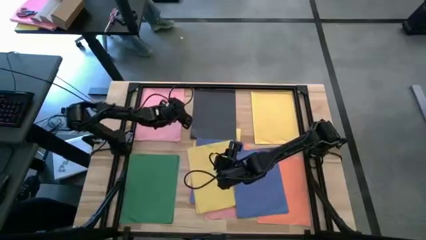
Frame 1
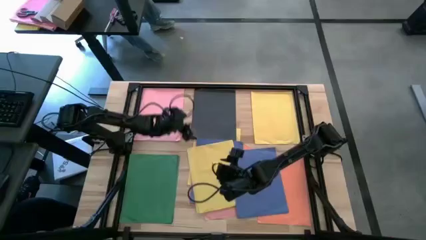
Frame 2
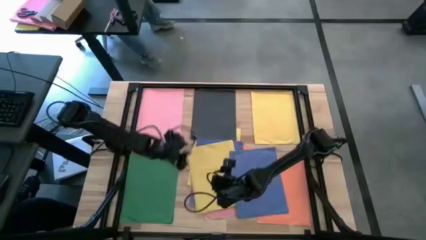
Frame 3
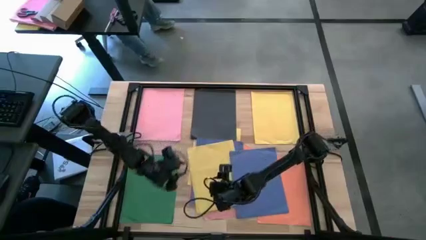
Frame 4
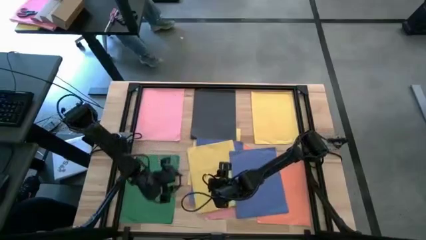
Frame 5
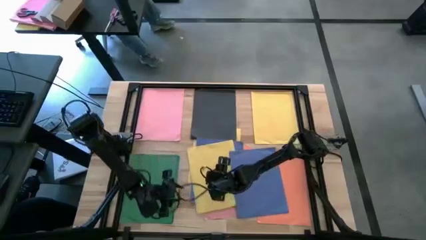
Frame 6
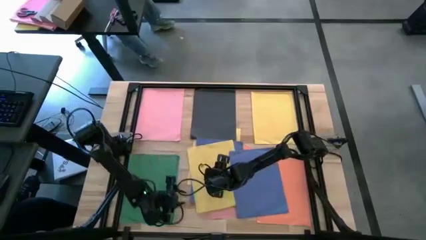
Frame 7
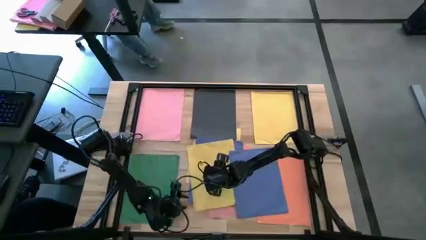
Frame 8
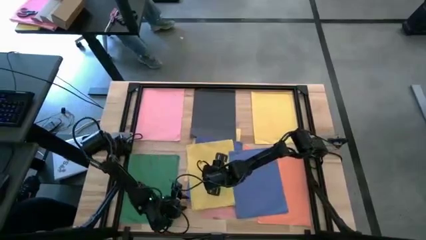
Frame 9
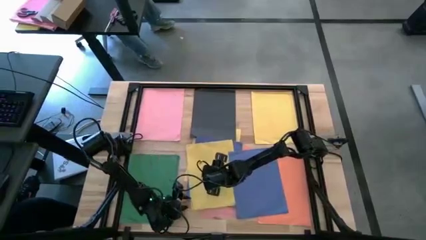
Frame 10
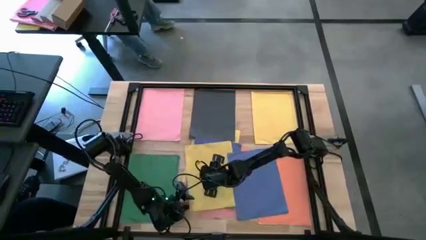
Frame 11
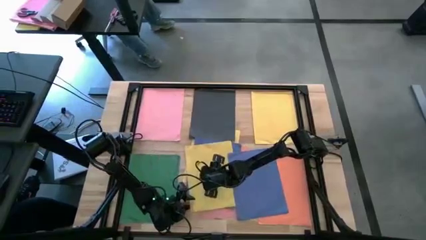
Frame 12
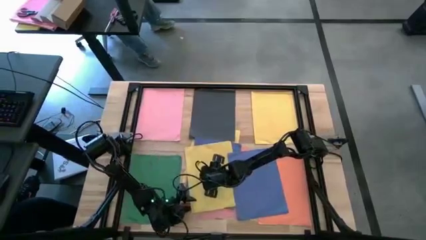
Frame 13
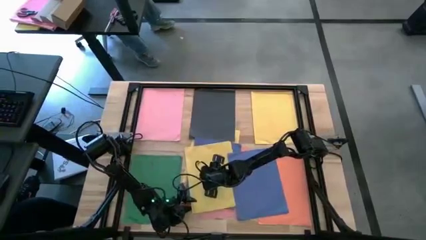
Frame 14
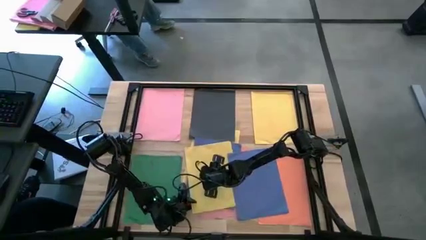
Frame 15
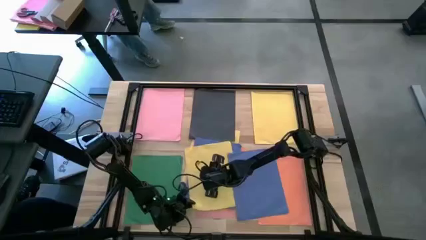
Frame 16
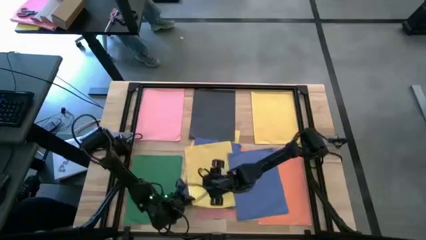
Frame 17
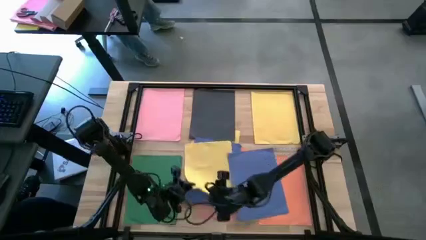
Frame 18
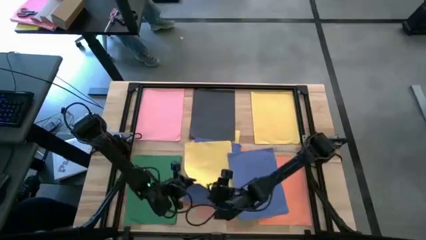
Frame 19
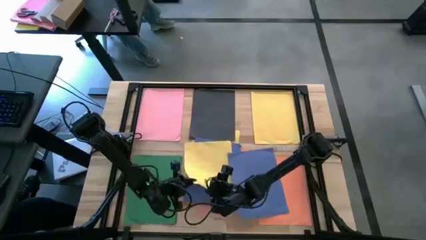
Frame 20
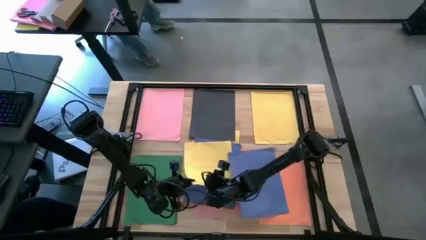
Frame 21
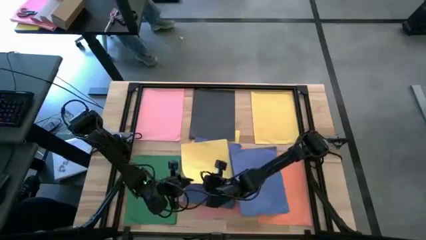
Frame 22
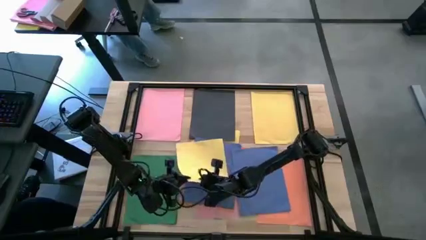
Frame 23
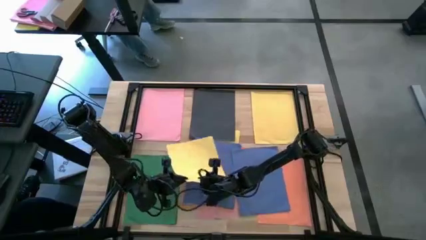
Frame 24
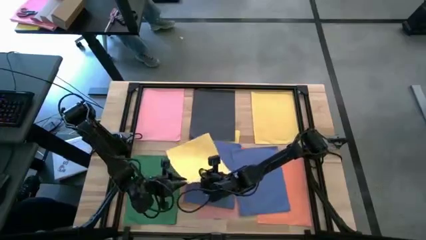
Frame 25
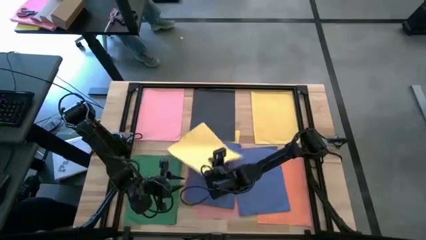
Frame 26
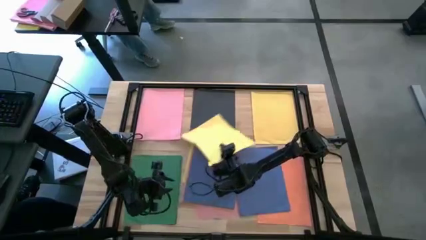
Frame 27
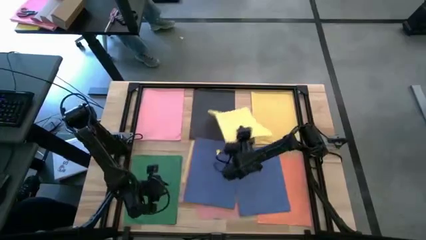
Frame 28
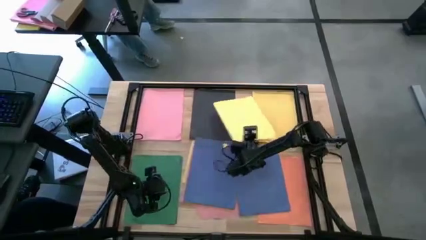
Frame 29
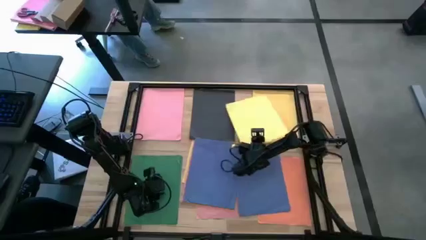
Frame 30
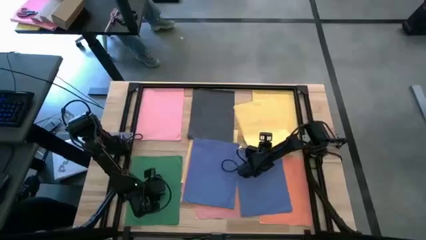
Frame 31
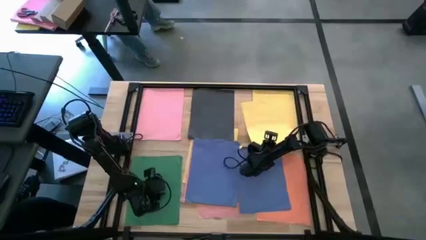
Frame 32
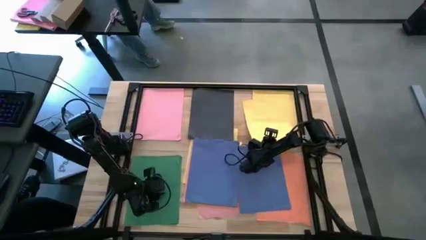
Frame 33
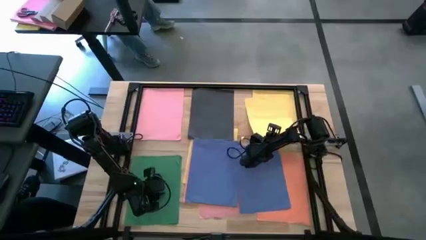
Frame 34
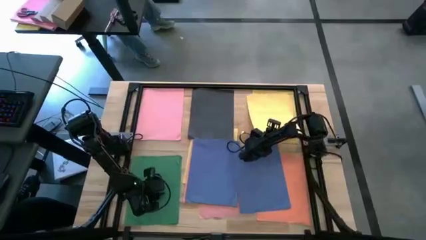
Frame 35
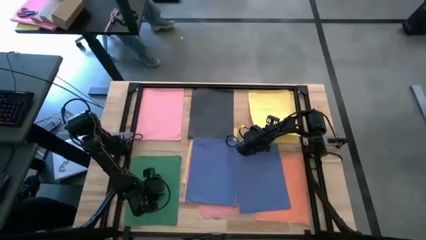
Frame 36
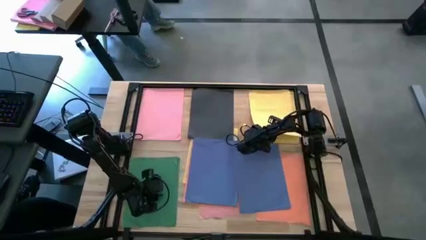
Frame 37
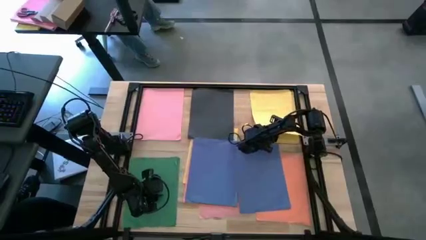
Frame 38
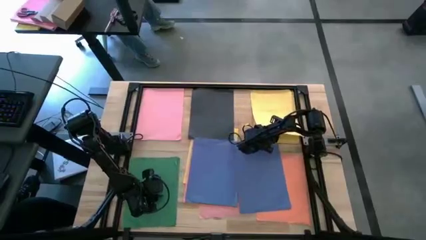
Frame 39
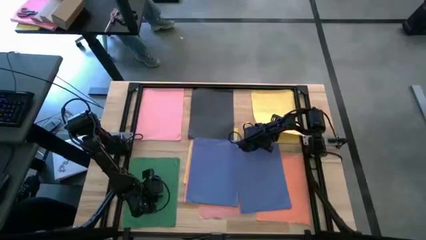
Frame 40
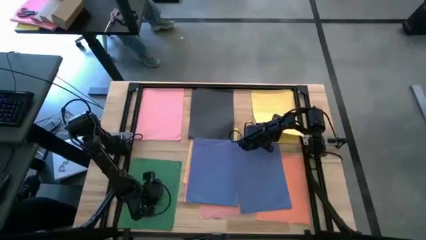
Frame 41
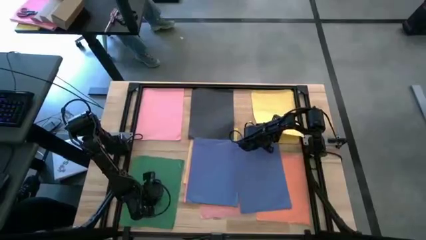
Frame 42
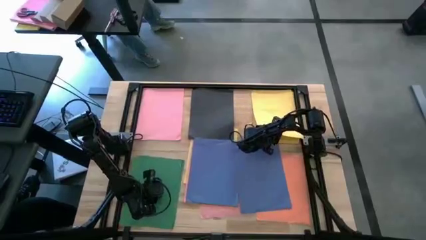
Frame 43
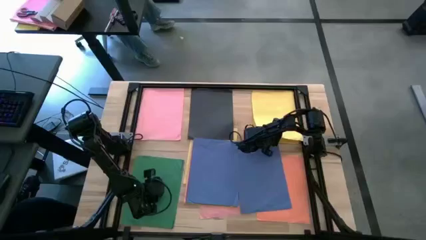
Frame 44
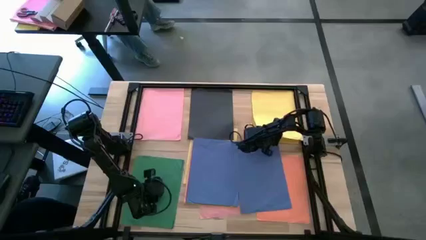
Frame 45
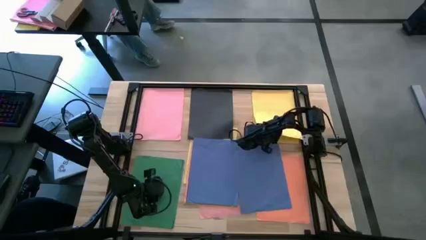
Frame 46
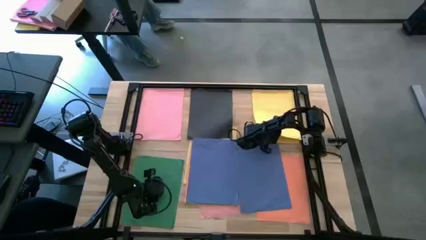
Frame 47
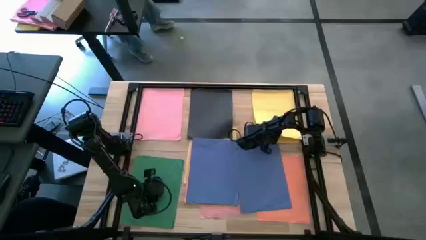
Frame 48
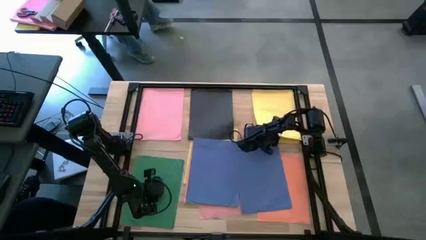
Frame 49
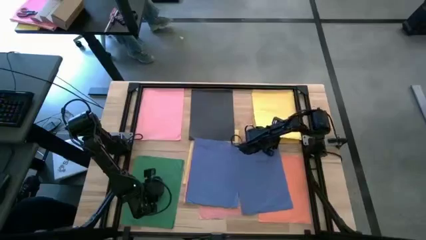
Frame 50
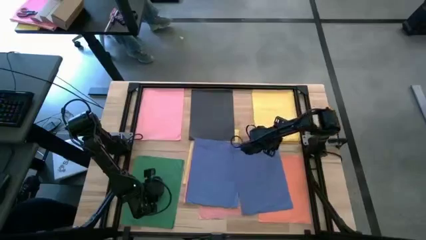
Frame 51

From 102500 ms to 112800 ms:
Task: Organize paper
Stack the yellow color paper on top of the other yellow color paper

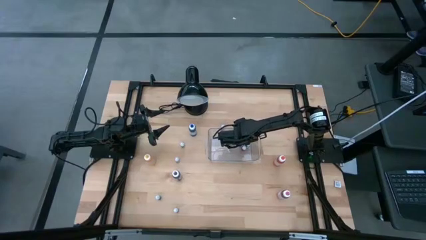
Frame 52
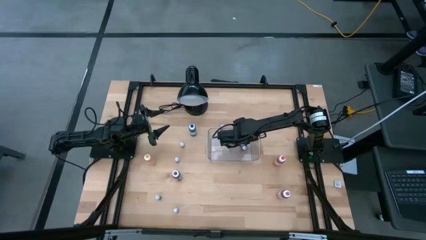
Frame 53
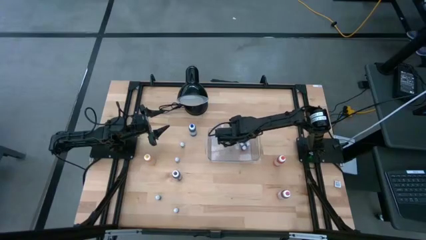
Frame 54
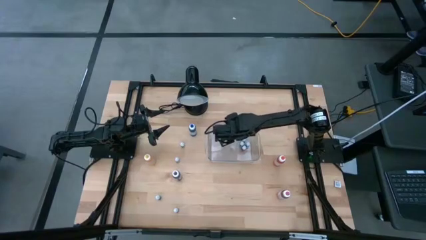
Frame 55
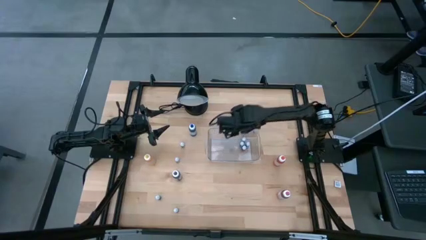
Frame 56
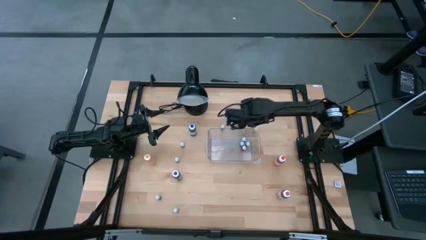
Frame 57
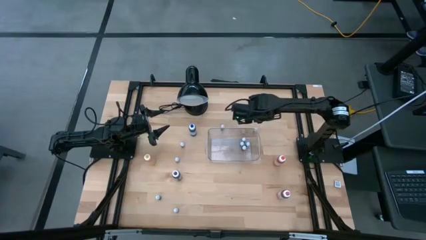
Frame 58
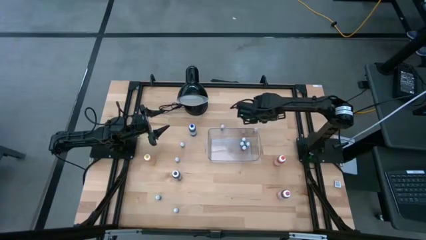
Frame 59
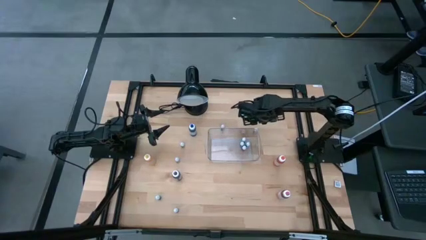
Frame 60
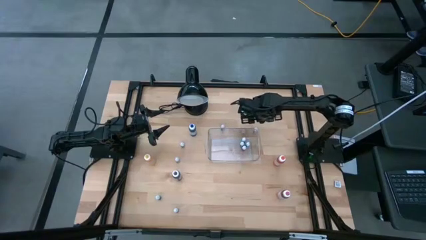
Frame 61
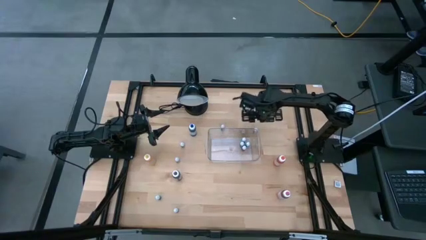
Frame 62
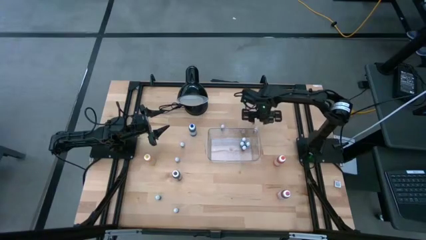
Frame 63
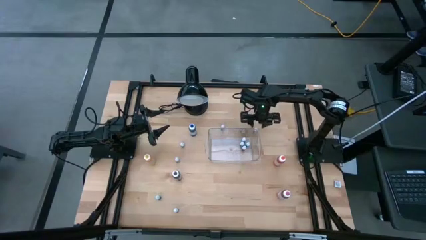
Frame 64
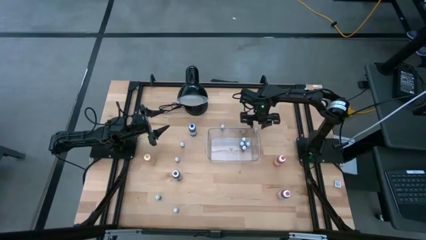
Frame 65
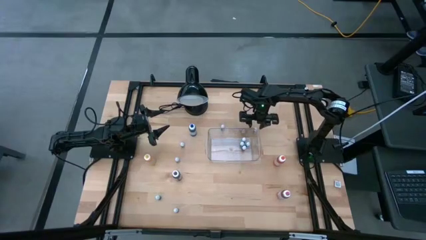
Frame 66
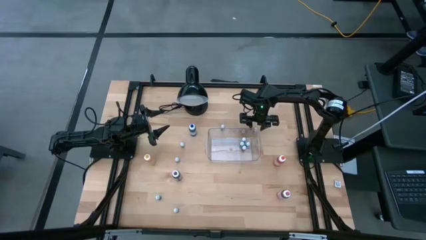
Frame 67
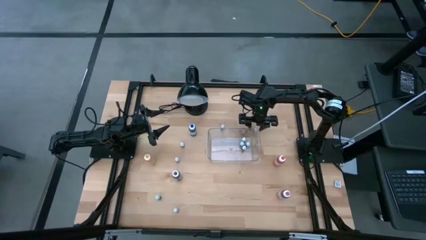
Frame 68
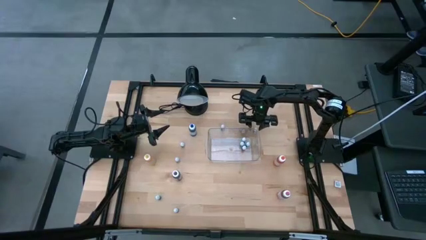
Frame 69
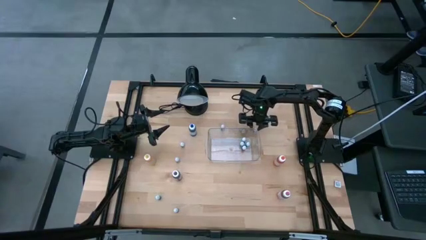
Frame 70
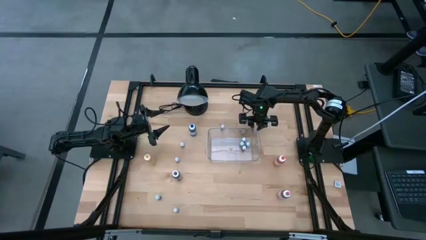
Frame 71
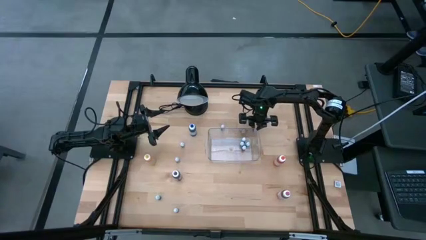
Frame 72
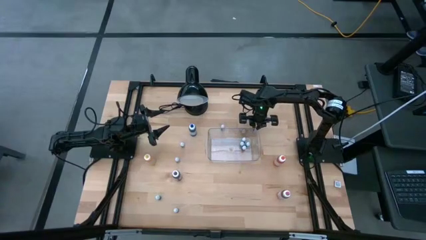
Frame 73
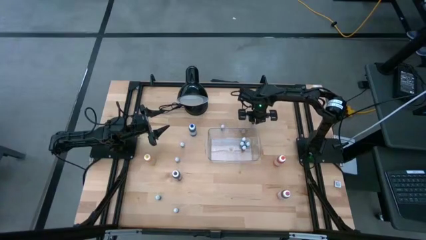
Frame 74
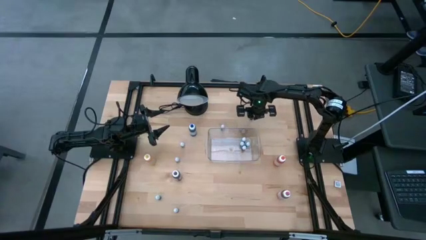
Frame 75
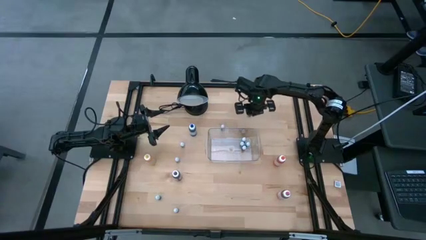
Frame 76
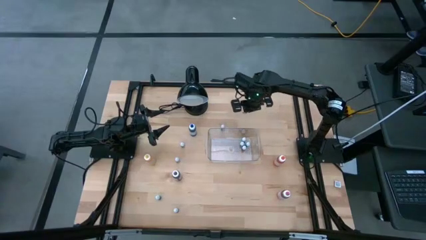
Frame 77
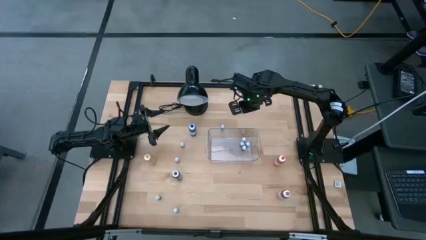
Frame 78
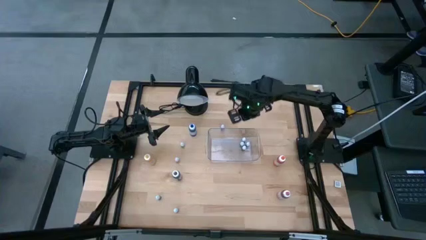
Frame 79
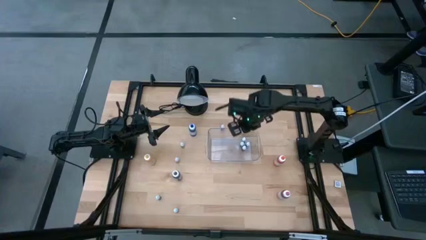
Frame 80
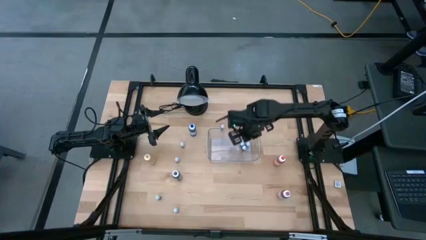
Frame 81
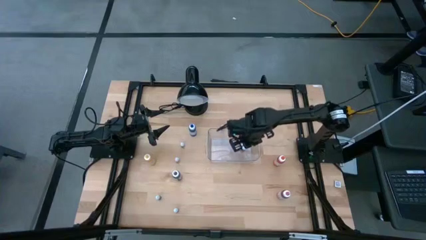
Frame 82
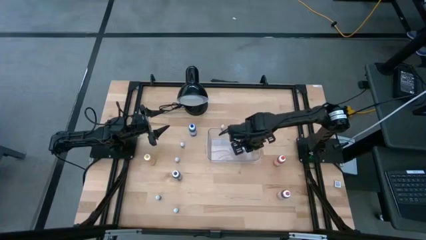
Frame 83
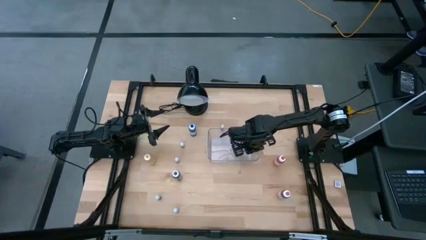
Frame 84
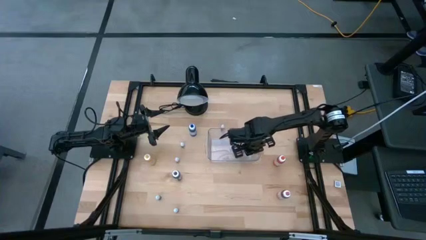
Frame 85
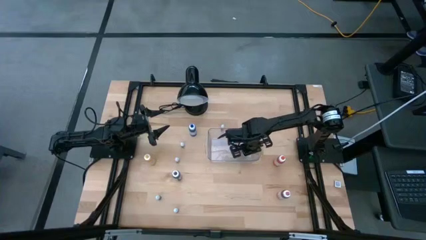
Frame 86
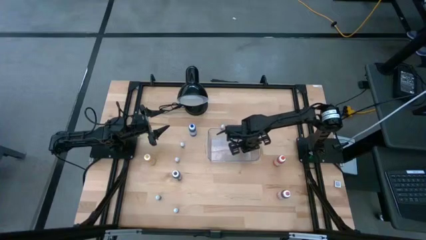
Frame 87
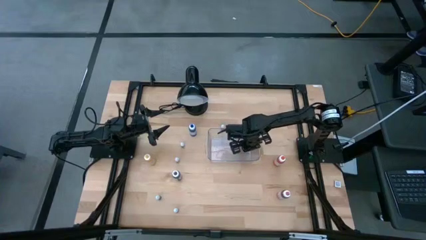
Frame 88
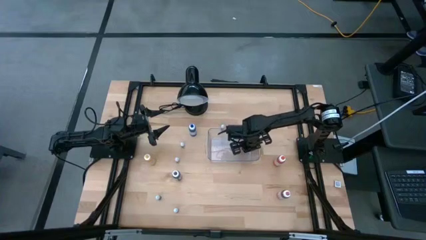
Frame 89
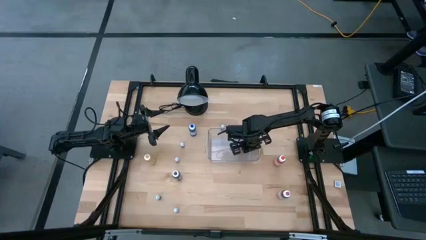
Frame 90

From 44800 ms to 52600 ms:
Task: Pick & Place food coloring
Put the small blue food coloring bottle into the transparent bin
